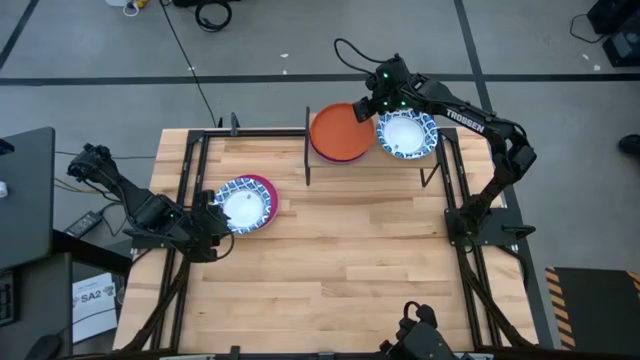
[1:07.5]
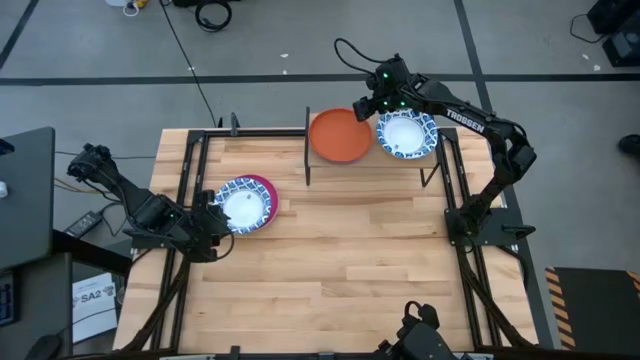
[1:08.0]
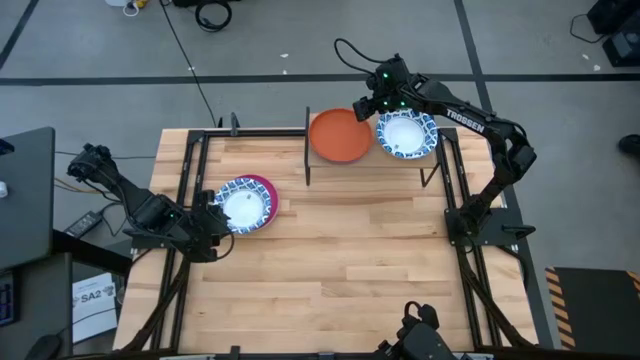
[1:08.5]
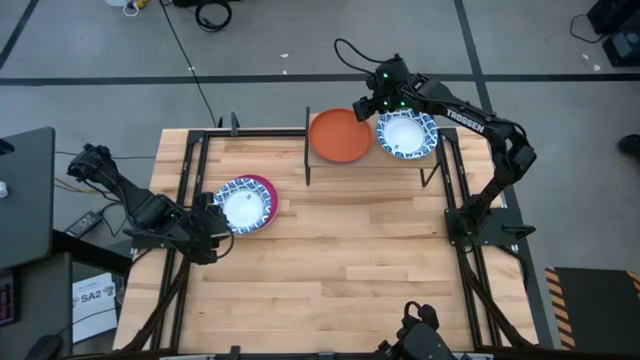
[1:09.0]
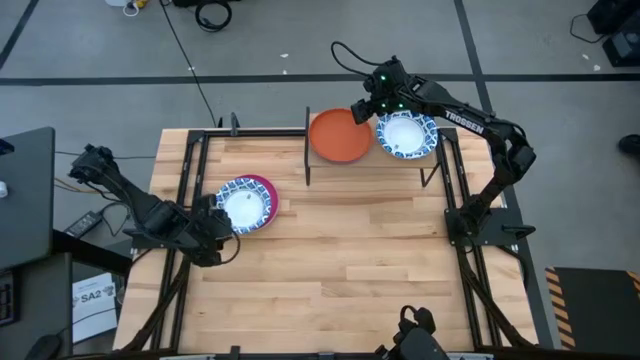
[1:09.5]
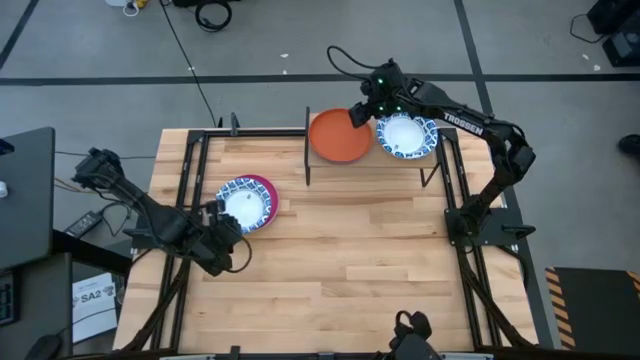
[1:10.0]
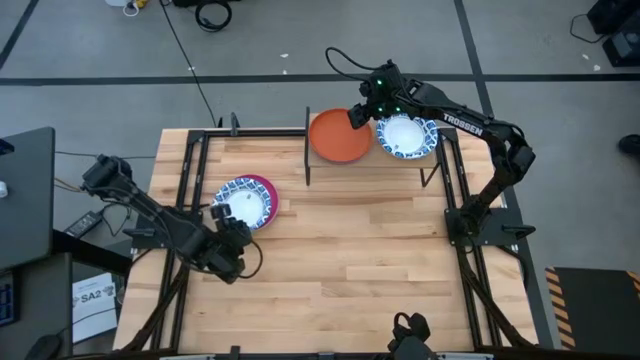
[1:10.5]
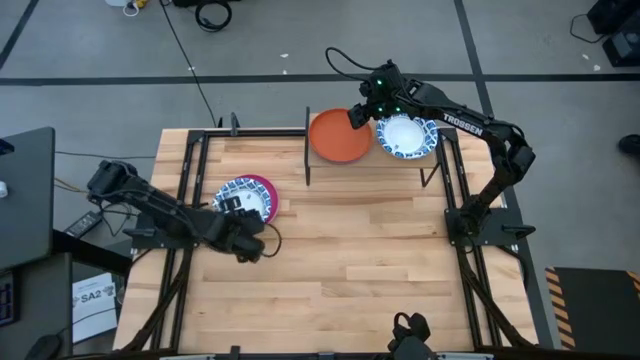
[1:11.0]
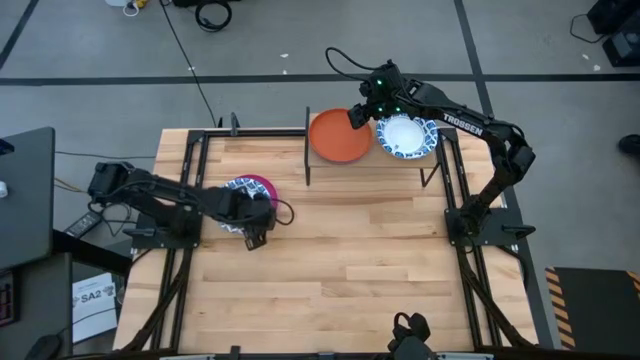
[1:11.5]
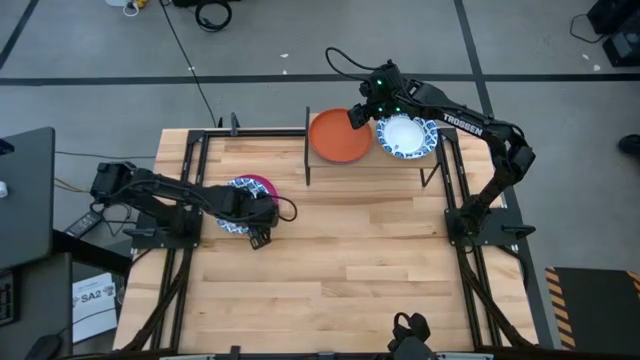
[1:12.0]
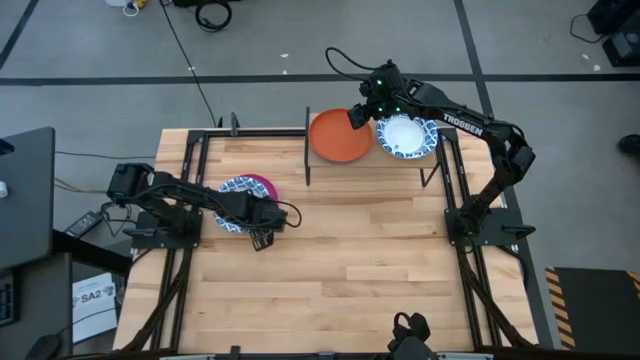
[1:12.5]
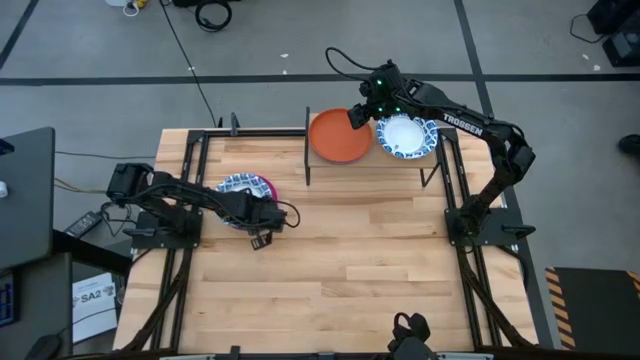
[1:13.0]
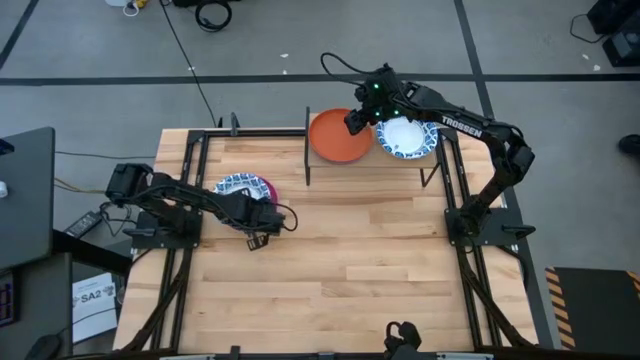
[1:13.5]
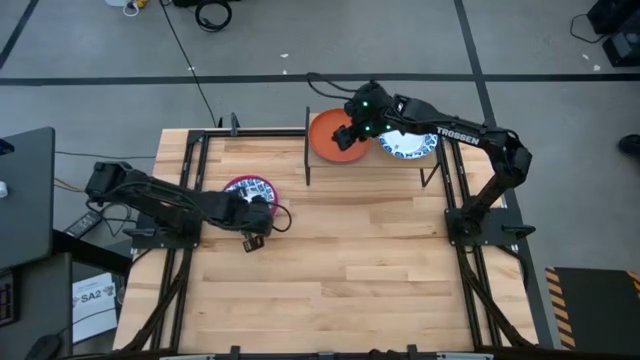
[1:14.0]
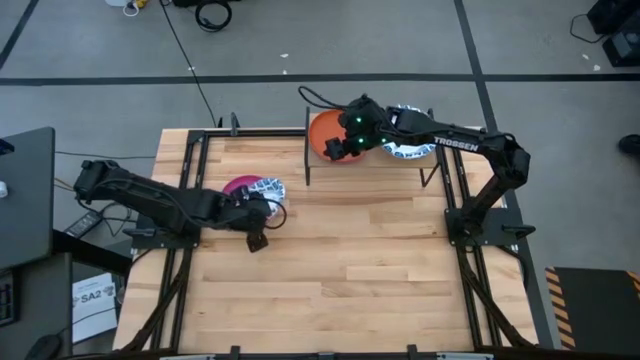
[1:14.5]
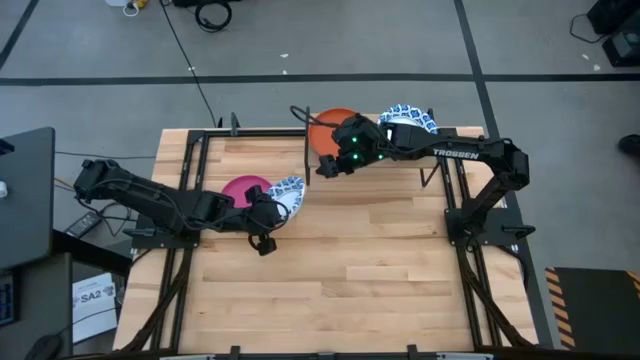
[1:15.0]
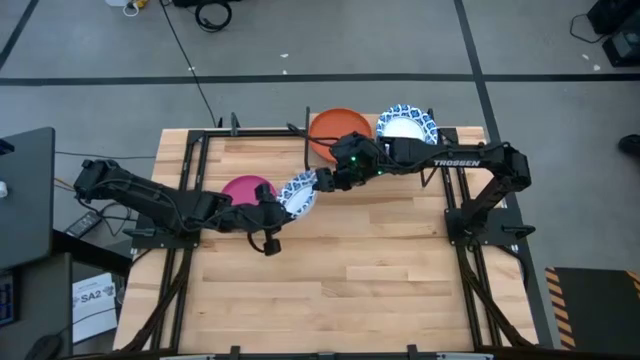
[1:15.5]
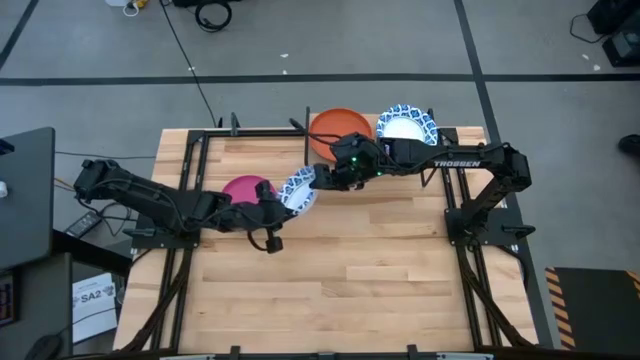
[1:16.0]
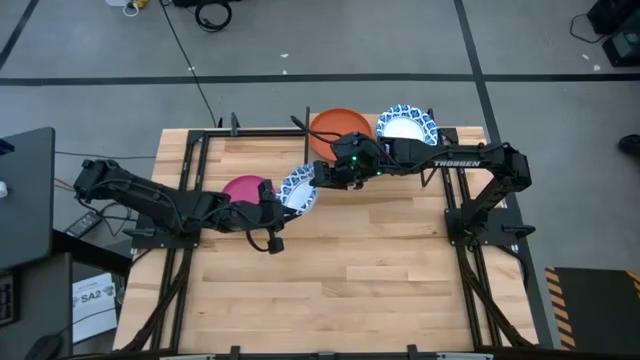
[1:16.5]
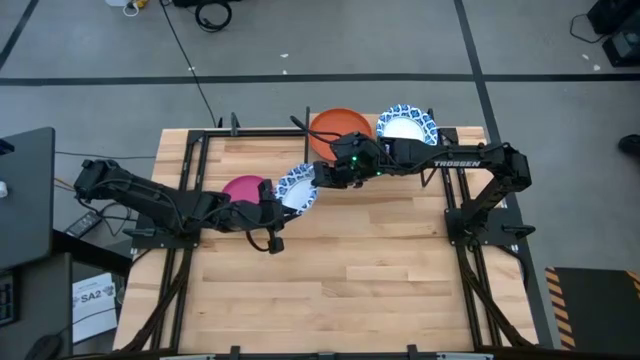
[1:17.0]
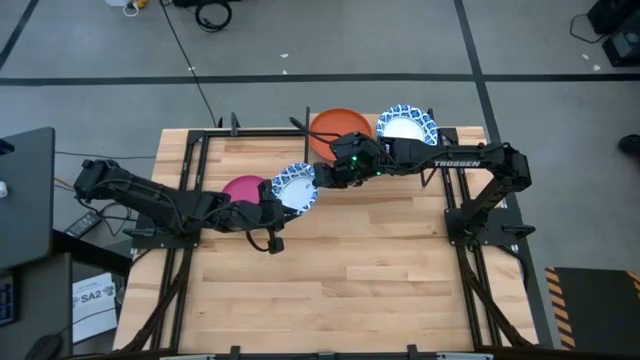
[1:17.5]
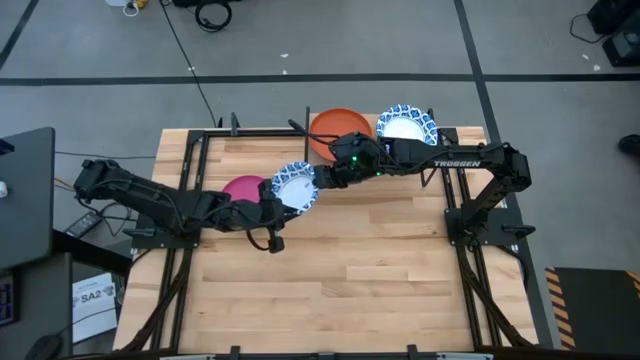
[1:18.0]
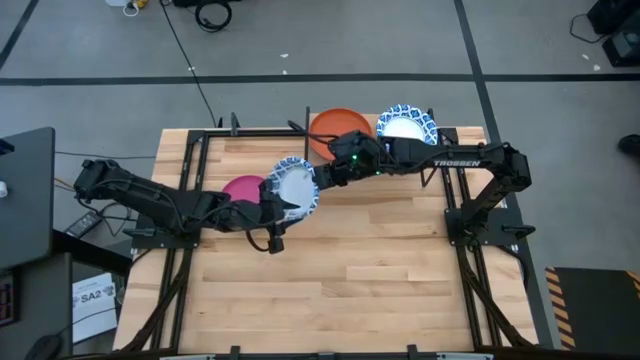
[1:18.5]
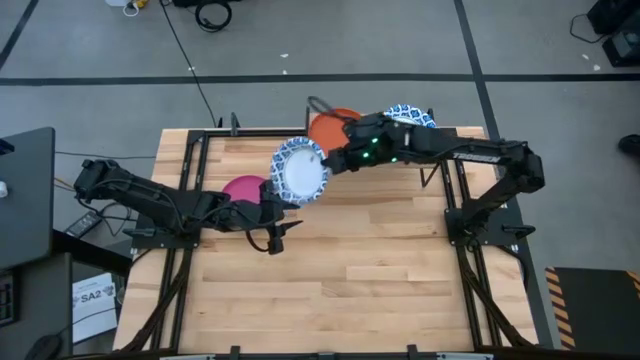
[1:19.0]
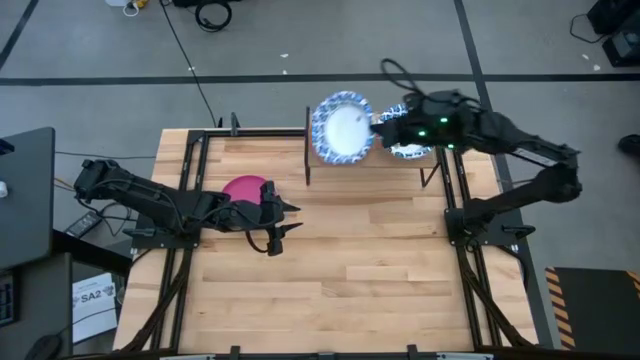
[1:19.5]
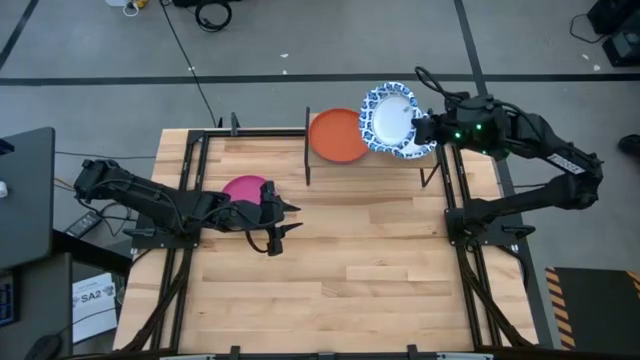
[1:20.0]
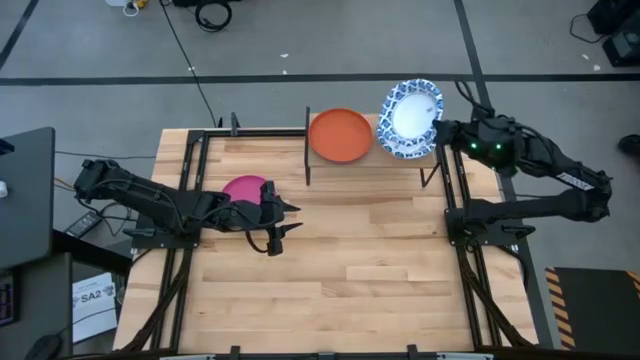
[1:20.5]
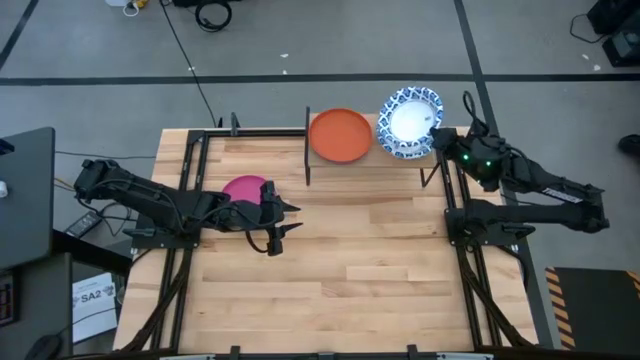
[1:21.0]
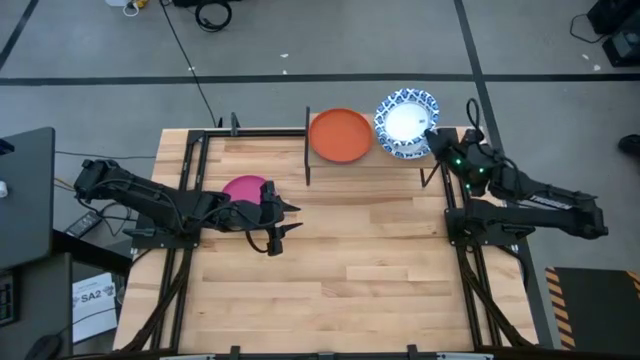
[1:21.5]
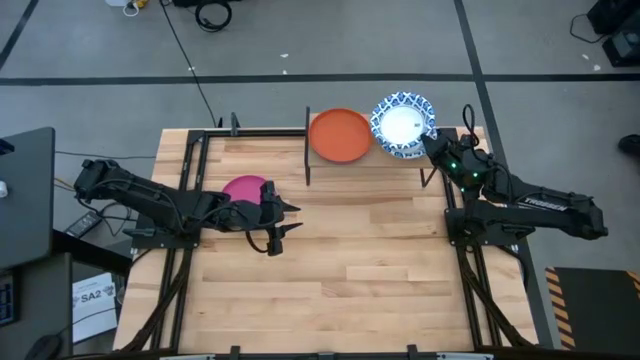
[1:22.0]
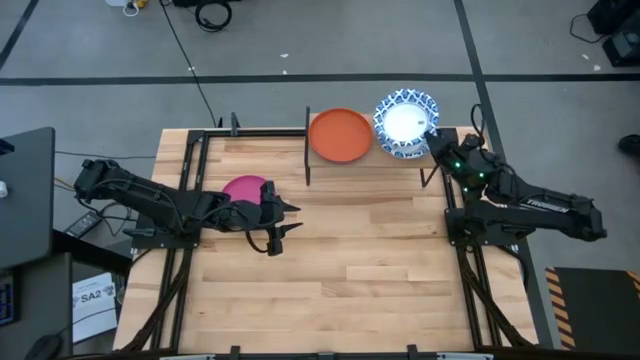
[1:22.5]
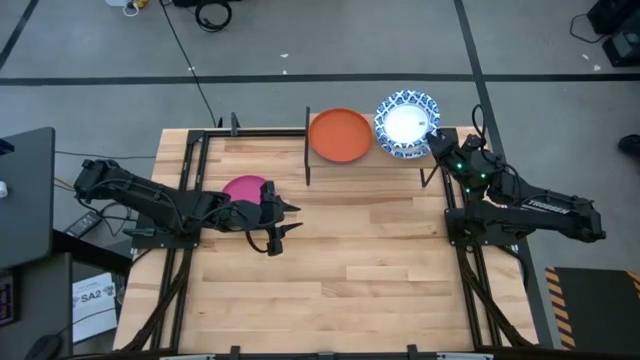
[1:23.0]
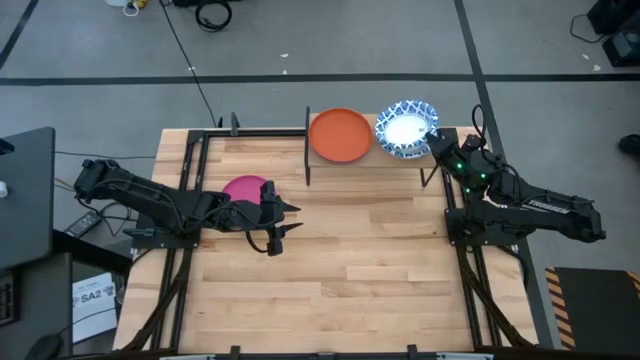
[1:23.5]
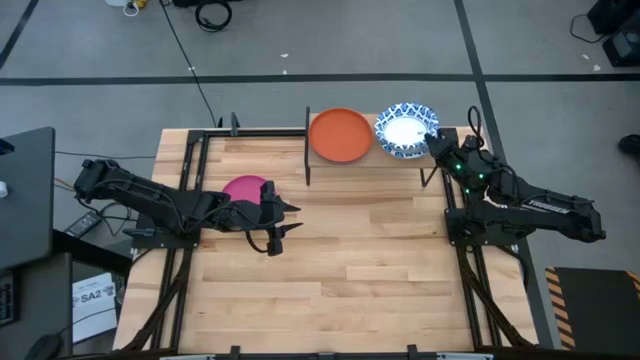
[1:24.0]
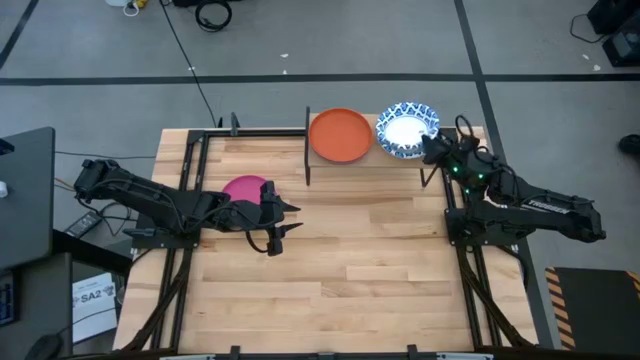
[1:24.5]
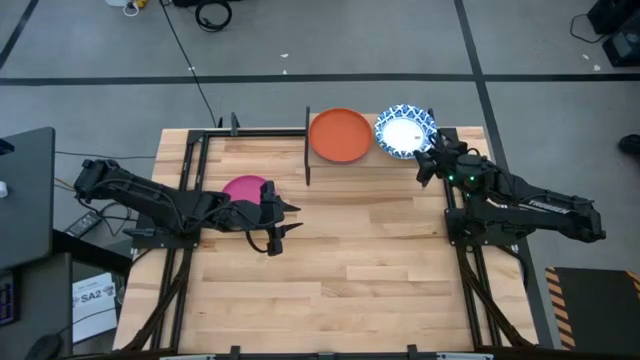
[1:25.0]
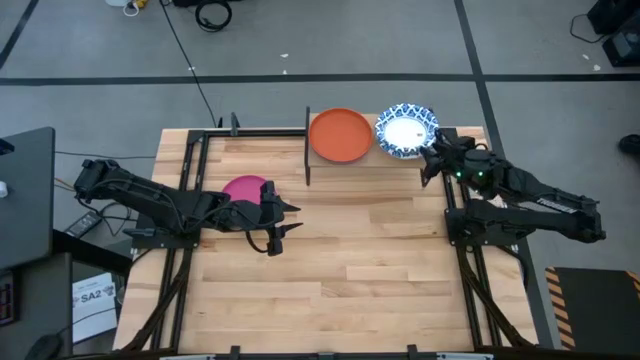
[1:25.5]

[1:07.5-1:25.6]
Task: Place and stack plates onto a shelf
Stack the white patterned bowl on top of the white patterned bowl on the shelf

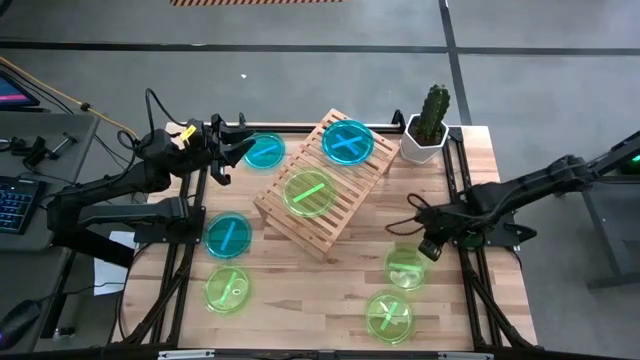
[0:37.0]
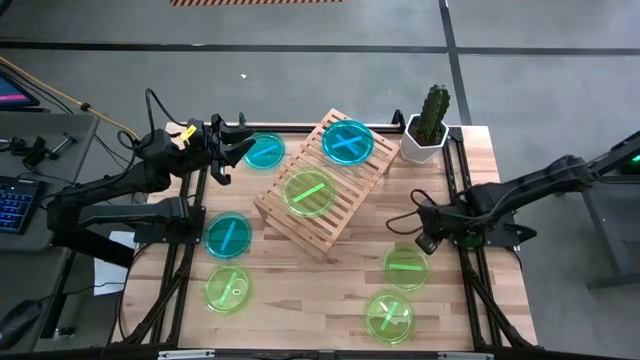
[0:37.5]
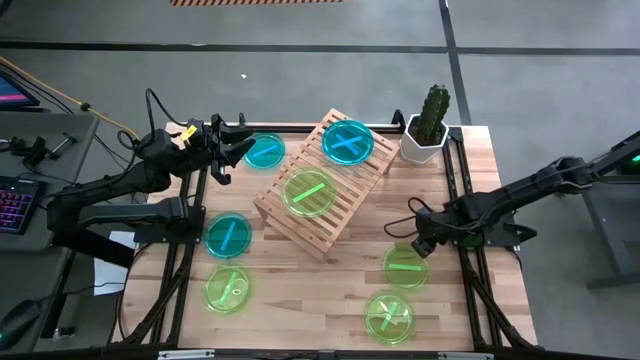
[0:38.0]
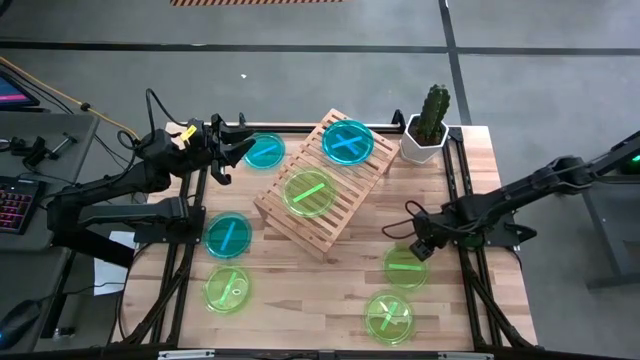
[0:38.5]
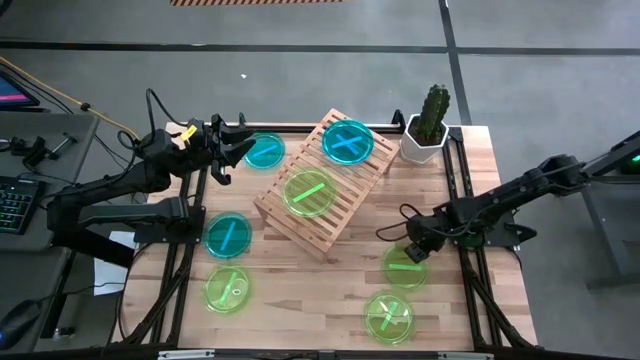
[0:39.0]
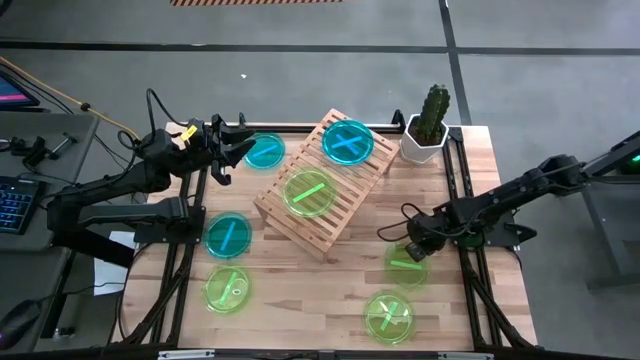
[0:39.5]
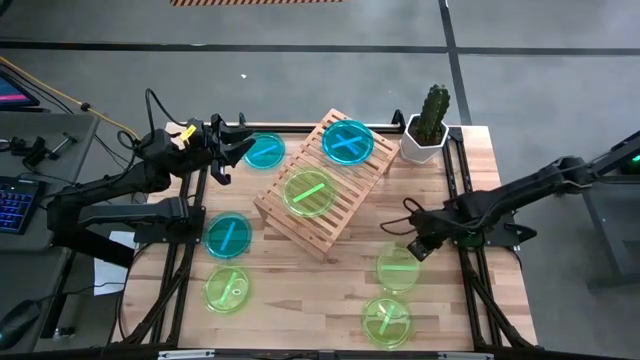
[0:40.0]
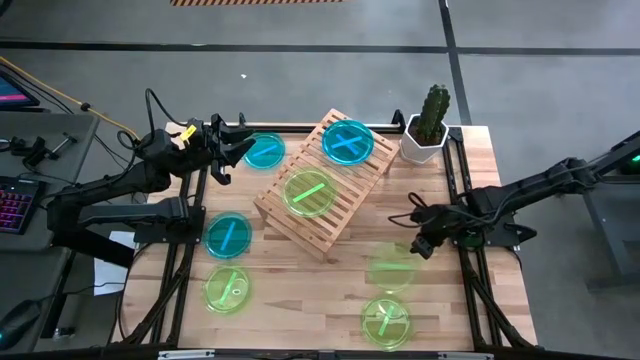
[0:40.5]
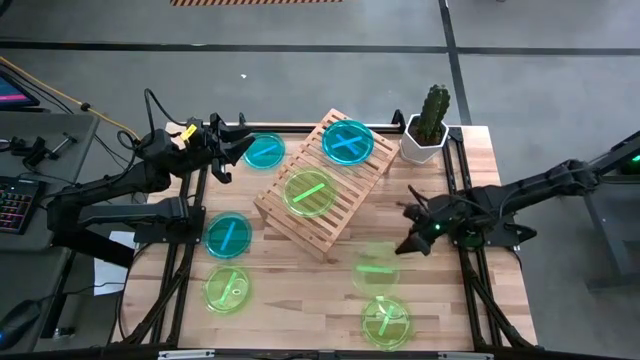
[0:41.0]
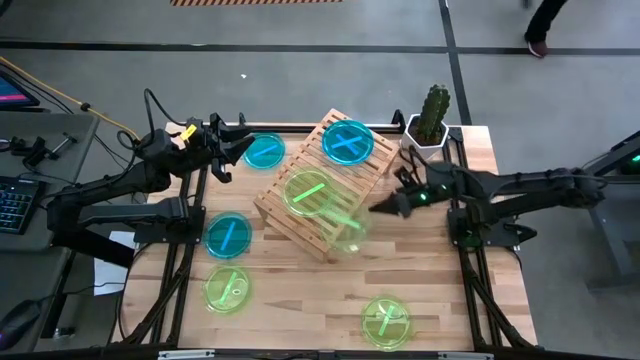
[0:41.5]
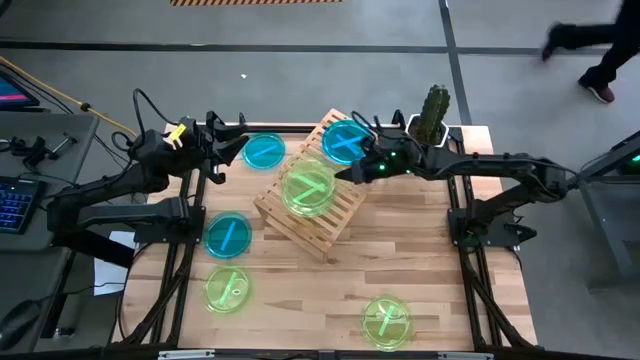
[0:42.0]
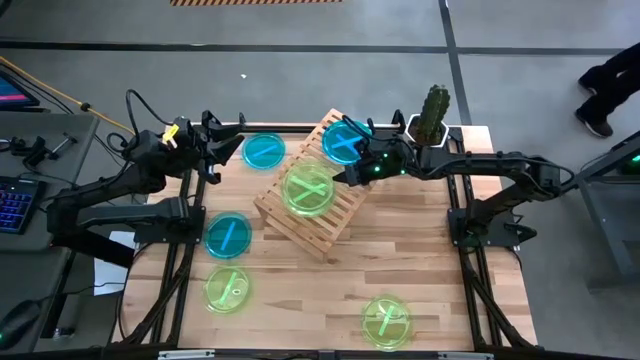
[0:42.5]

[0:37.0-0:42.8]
Task: Place and stack plates onto a shelf
Stack the green plate on top of the green plate on the shelf
